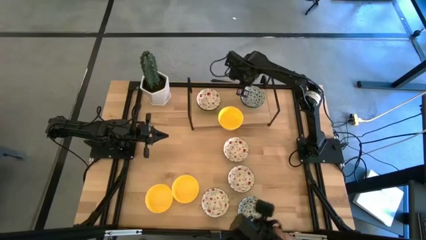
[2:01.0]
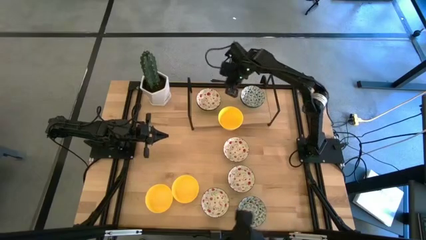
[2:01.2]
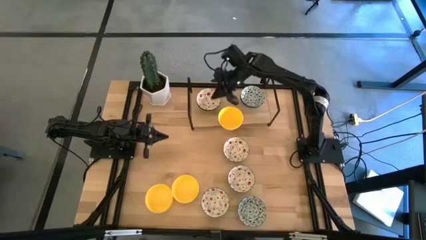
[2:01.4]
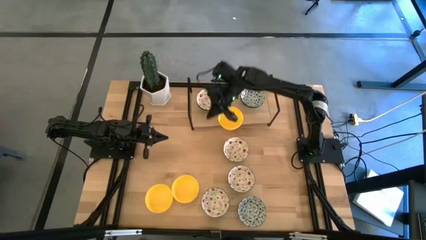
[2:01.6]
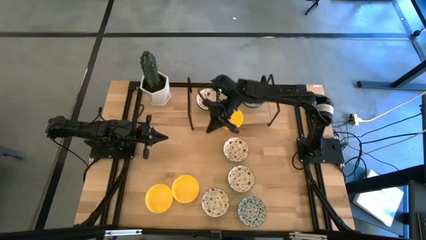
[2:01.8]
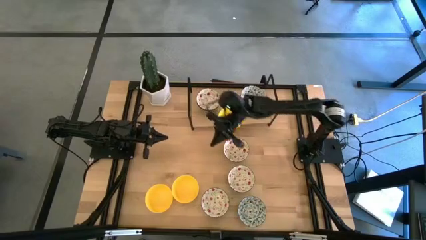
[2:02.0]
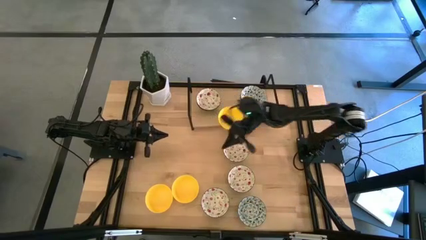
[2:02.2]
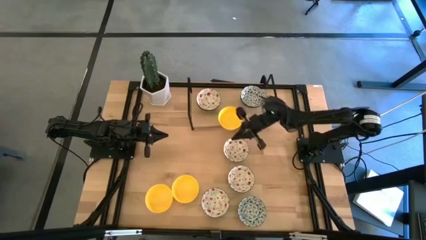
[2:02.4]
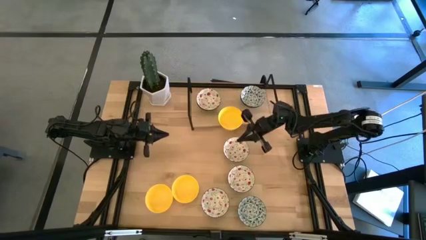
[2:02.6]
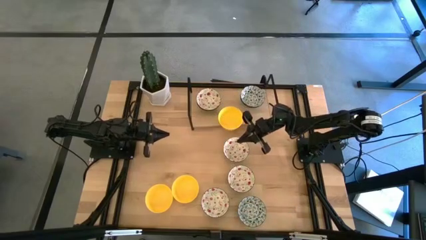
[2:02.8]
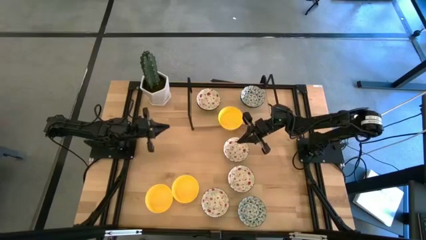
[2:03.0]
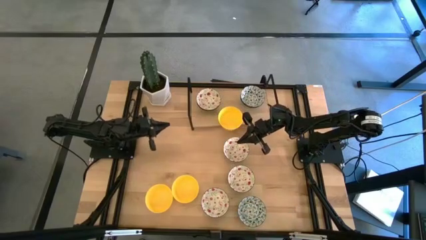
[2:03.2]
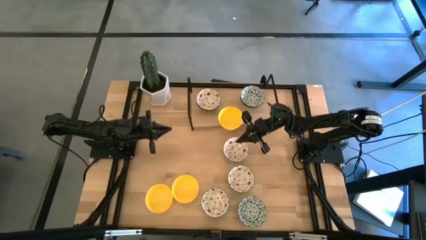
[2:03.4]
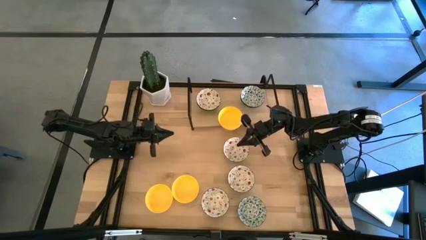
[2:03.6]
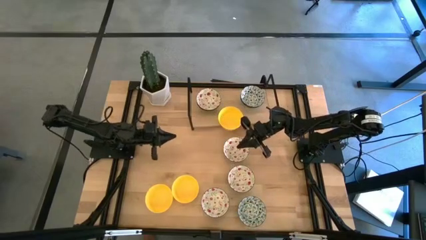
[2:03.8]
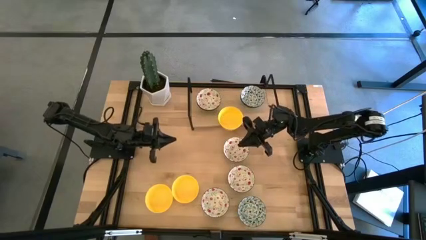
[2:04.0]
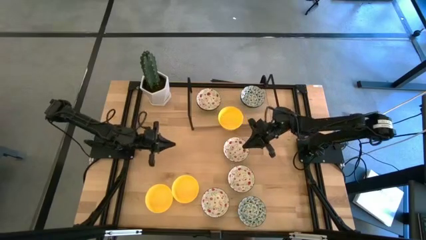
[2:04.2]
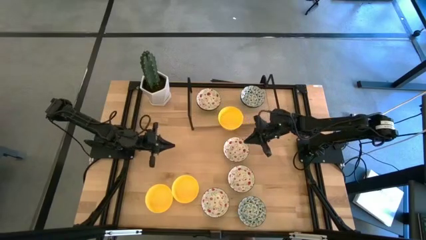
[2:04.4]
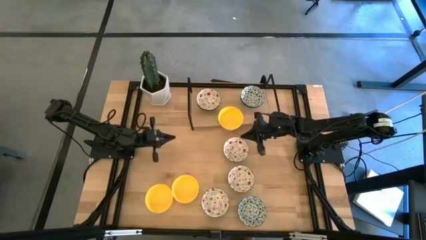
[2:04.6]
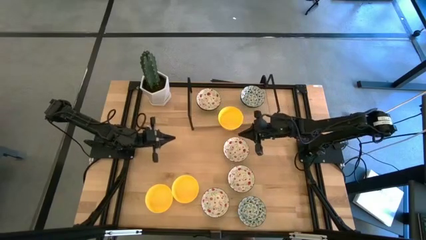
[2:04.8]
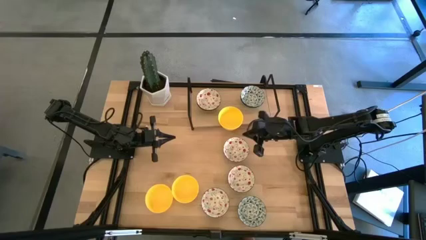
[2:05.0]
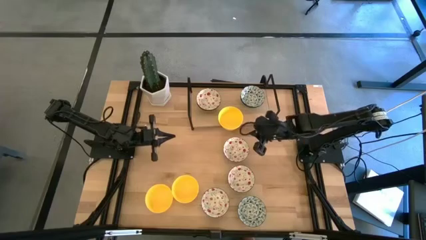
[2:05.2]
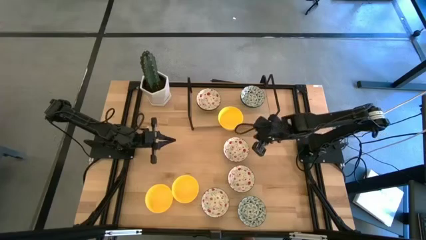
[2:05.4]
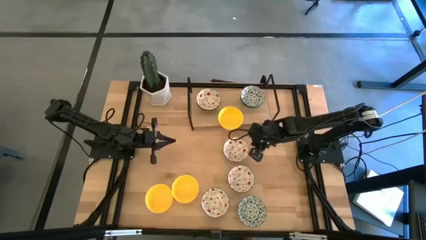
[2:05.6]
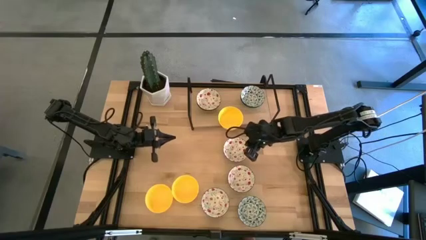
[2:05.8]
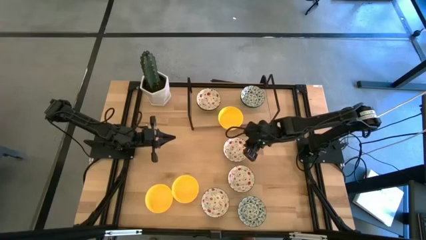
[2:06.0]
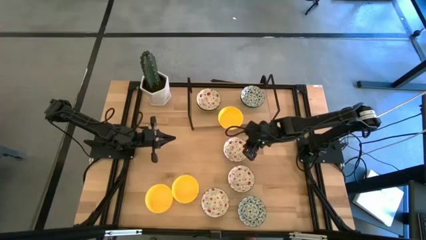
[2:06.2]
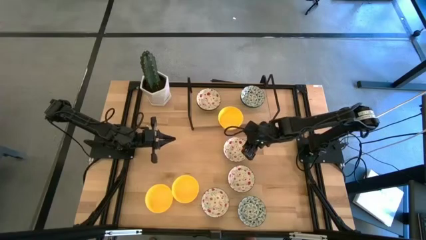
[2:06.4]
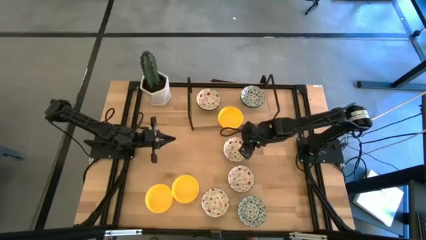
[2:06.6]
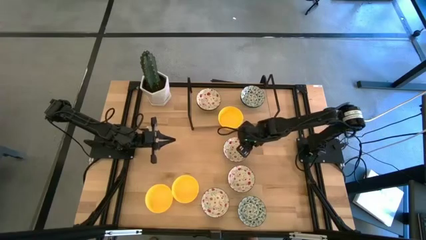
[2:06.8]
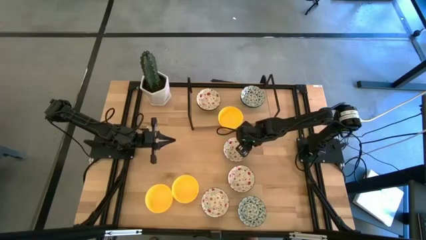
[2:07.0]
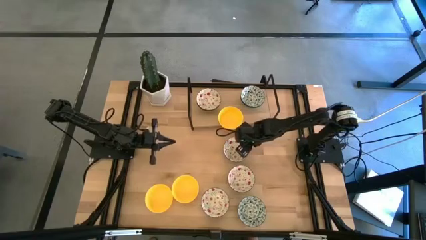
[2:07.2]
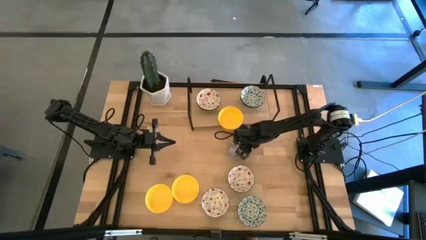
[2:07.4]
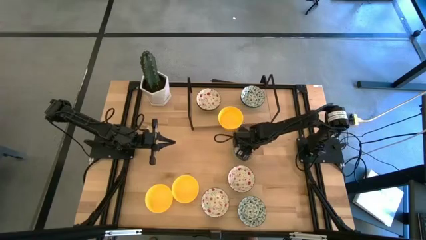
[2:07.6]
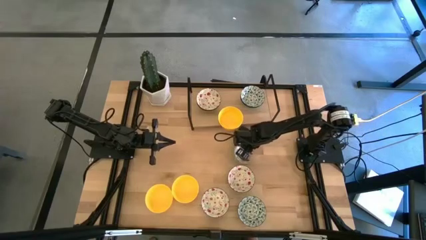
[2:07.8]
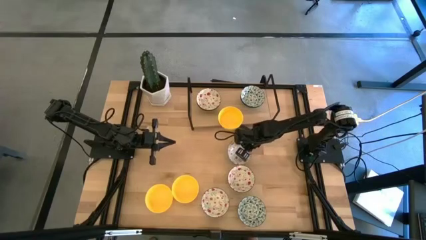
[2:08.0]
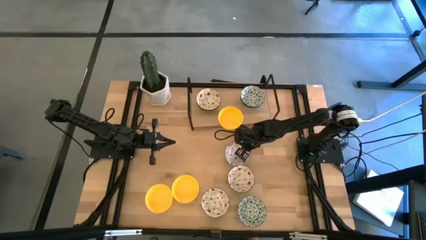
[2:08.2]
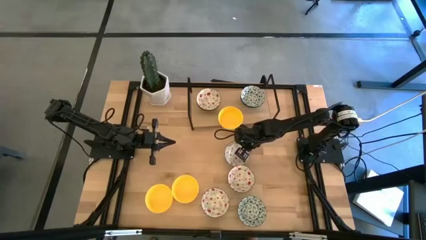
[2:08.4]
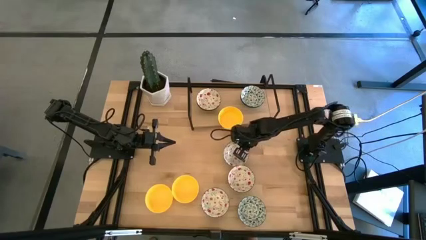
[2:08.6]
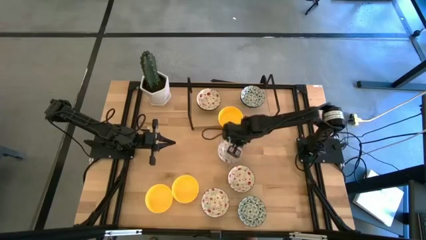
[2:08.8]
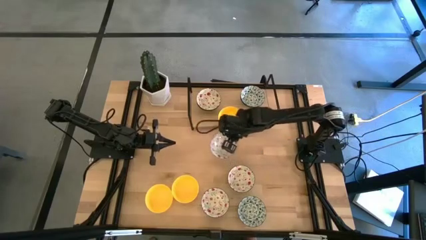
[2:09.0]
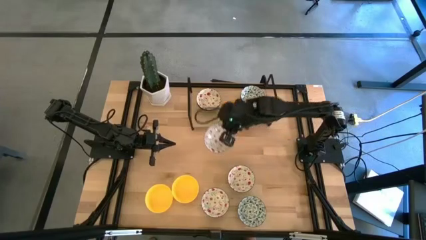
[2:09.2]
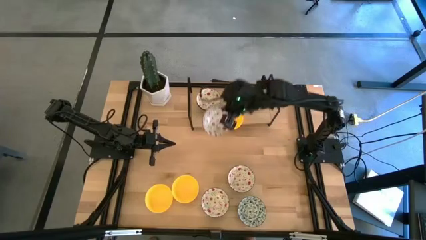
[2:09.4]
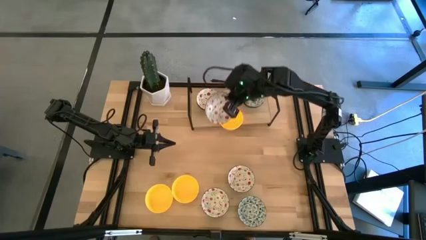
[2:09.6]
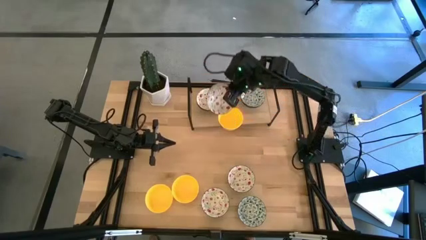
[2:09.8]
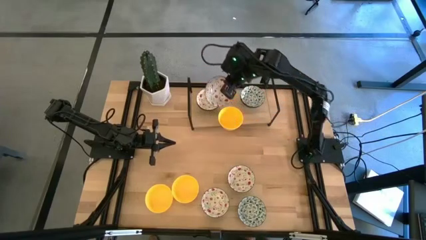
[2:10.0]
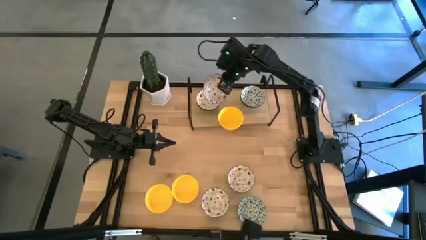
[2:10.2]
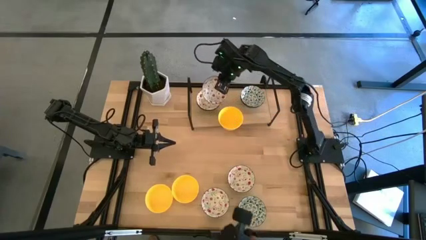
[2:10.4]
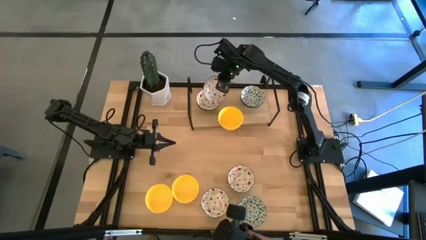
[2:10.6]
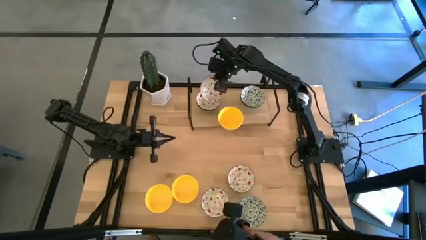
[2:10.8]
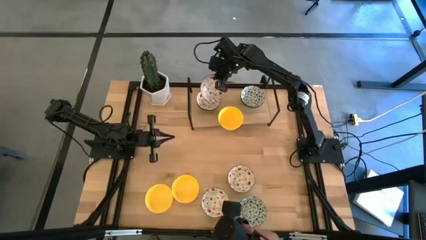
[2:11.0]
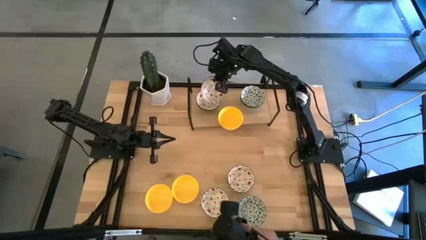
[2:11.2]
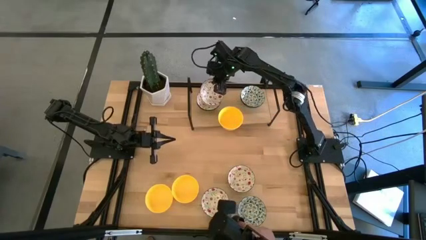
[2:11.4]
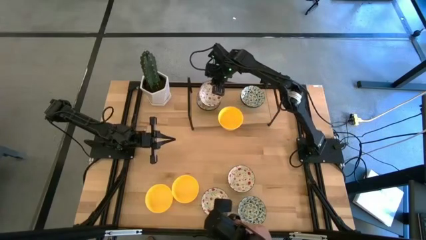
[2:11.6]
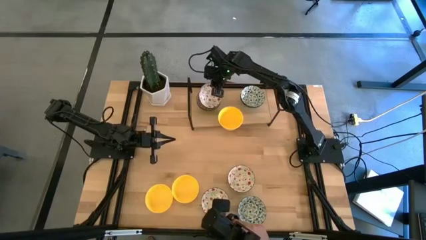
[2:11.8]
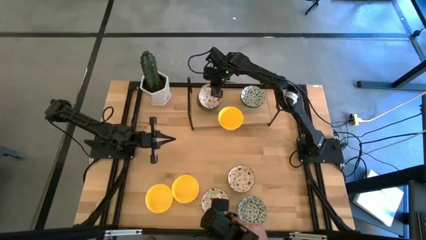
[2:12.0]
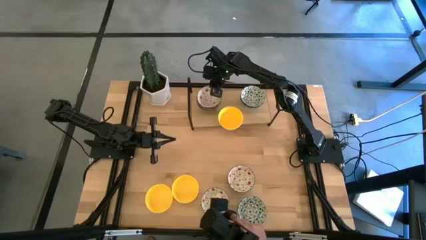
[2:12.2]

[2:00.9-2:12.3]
Task: Pick & Place Mini bowls
Stack the red patterned bowl on top of the red patterned bowl on the shelf
